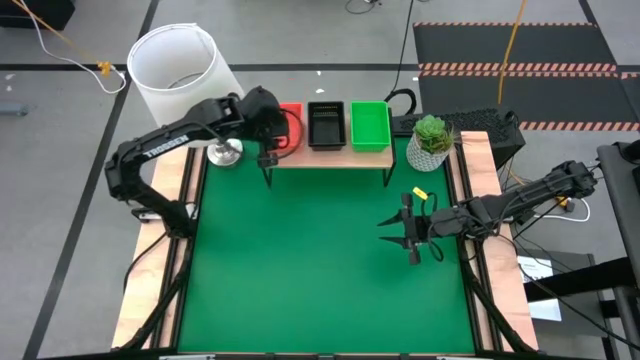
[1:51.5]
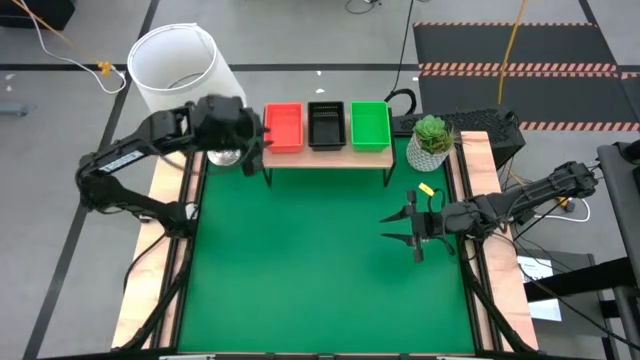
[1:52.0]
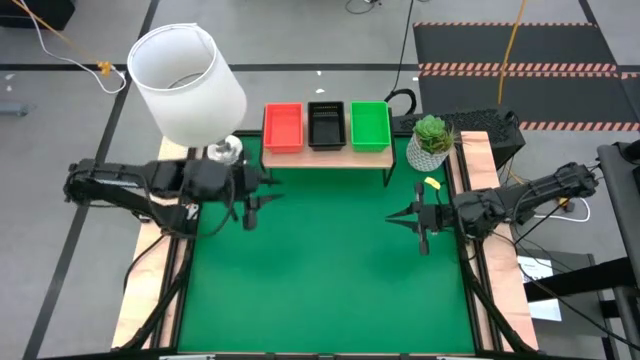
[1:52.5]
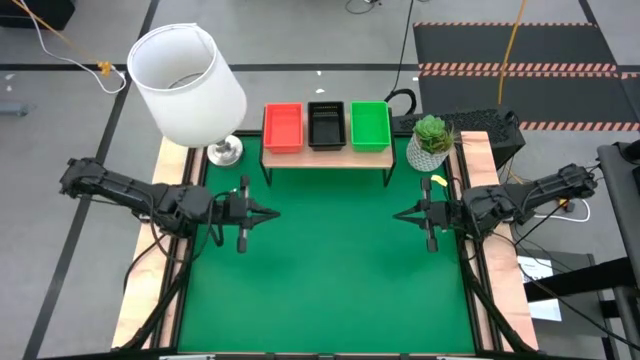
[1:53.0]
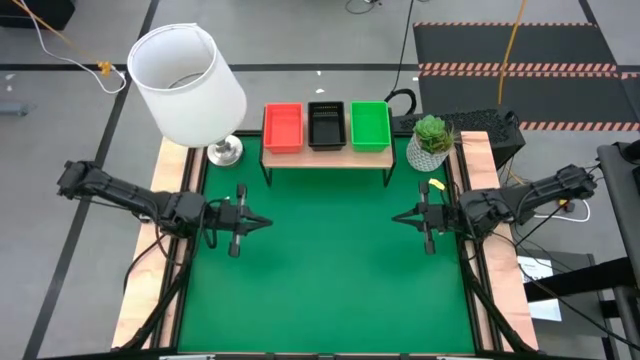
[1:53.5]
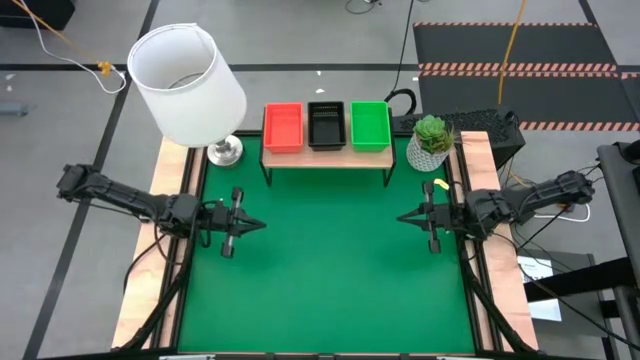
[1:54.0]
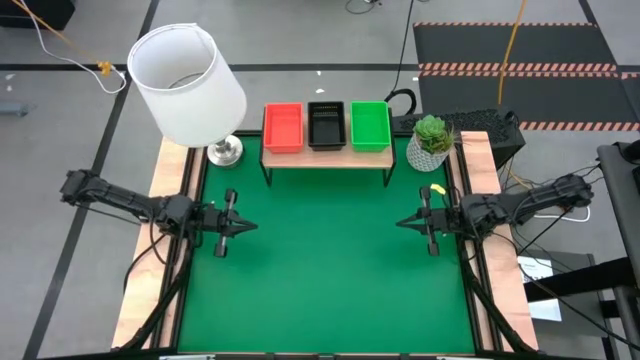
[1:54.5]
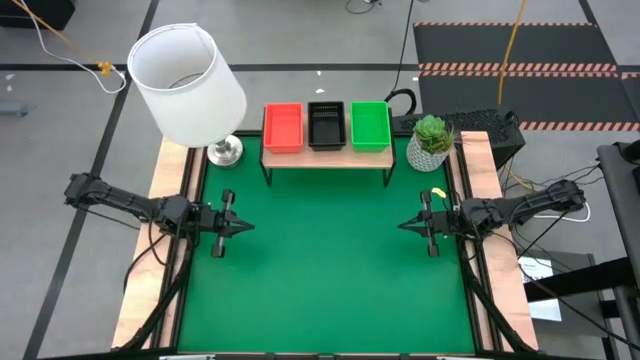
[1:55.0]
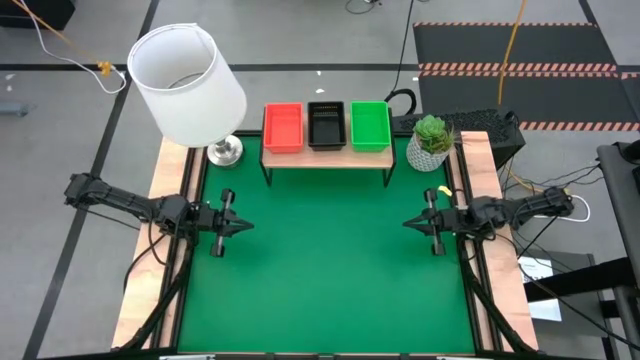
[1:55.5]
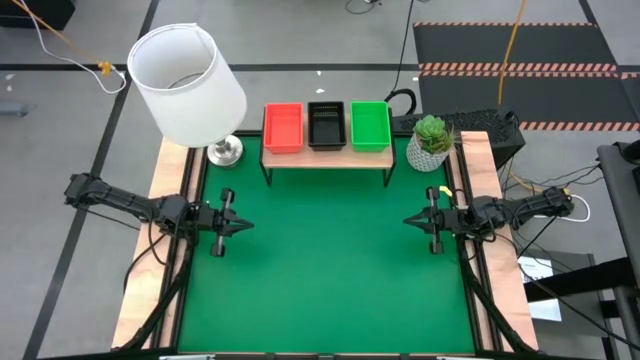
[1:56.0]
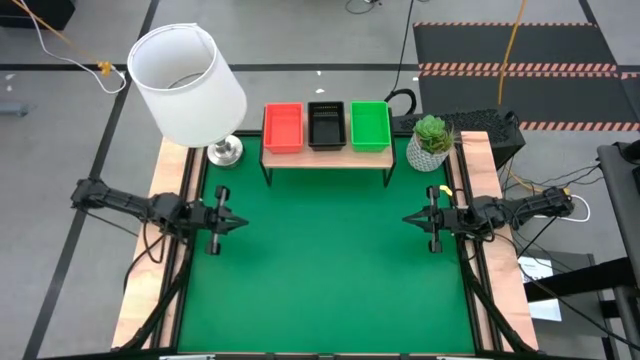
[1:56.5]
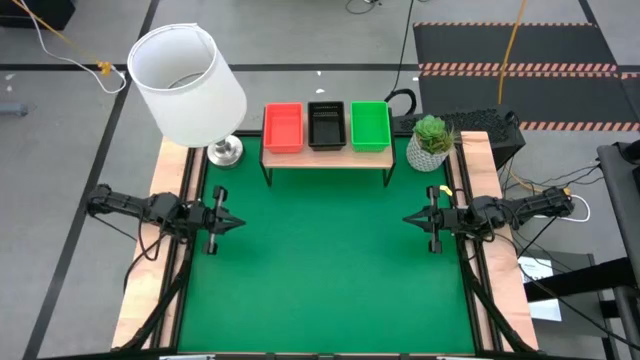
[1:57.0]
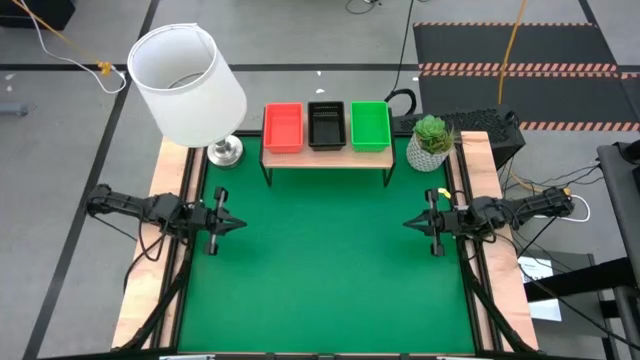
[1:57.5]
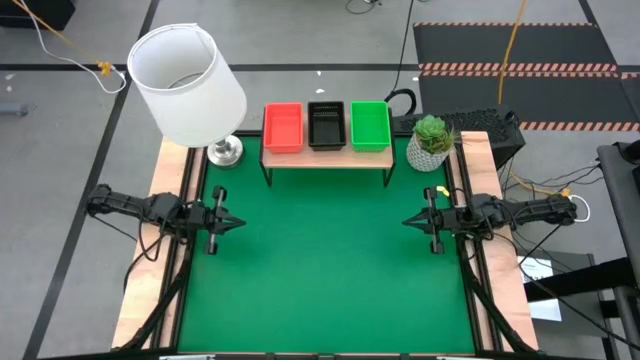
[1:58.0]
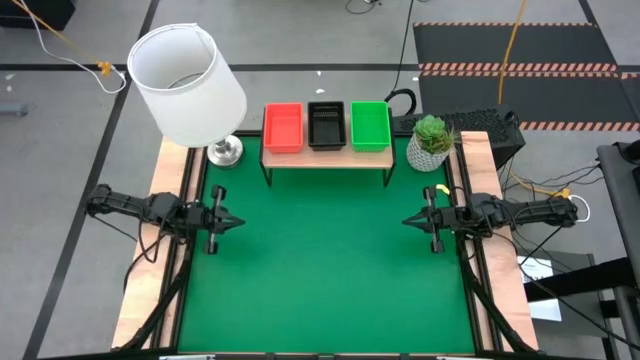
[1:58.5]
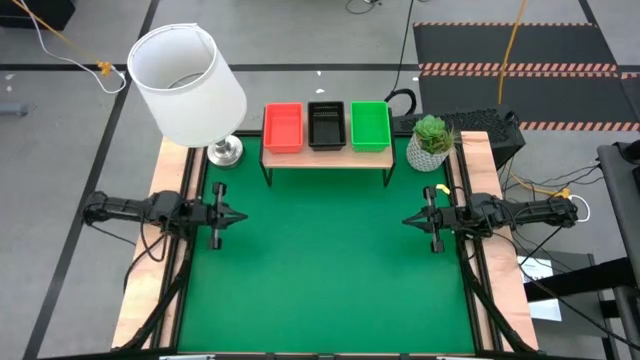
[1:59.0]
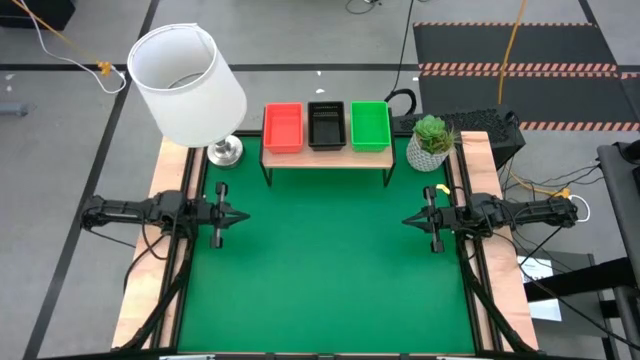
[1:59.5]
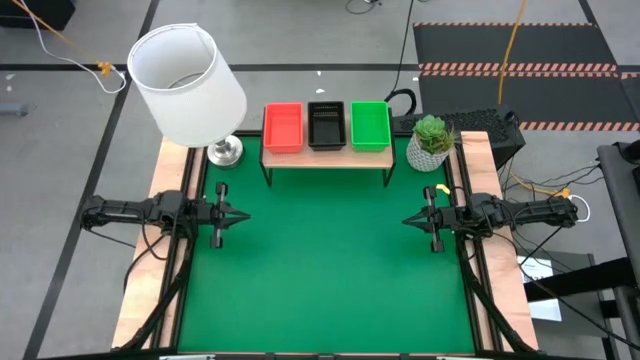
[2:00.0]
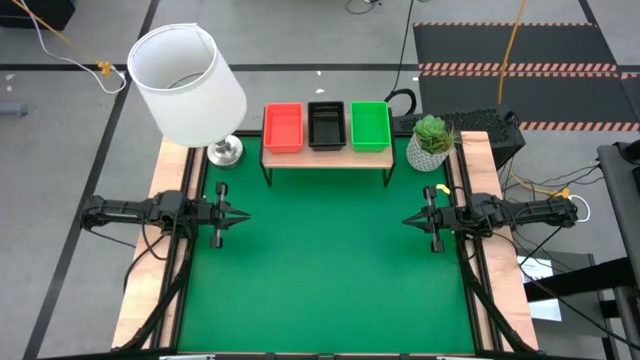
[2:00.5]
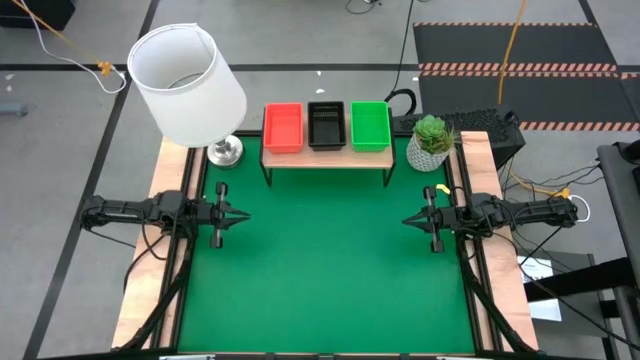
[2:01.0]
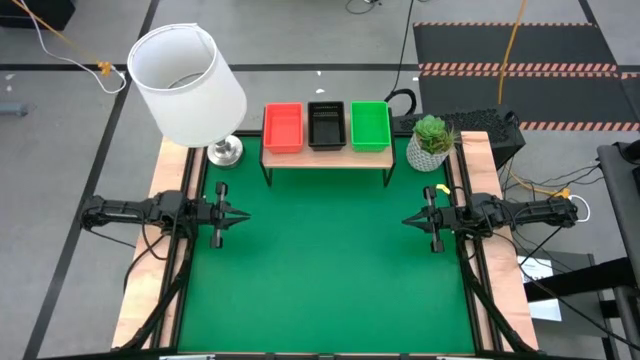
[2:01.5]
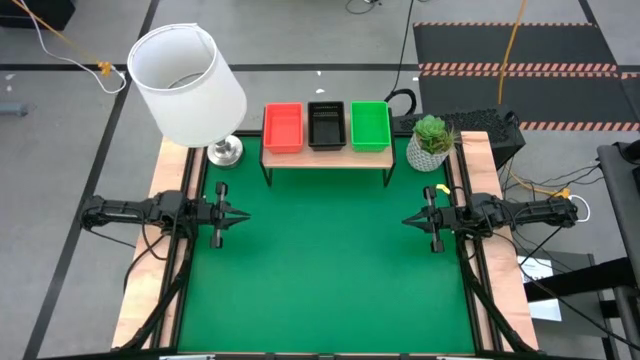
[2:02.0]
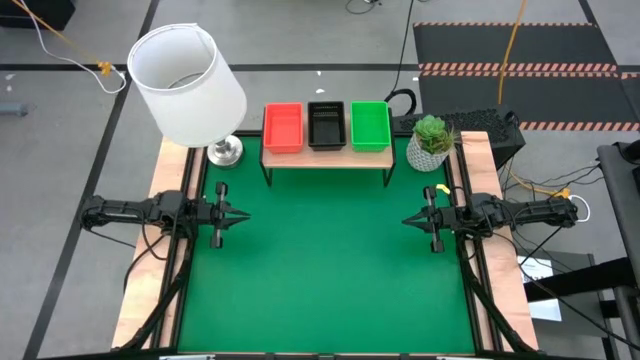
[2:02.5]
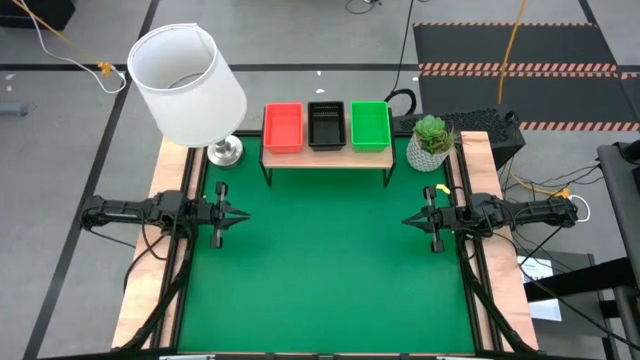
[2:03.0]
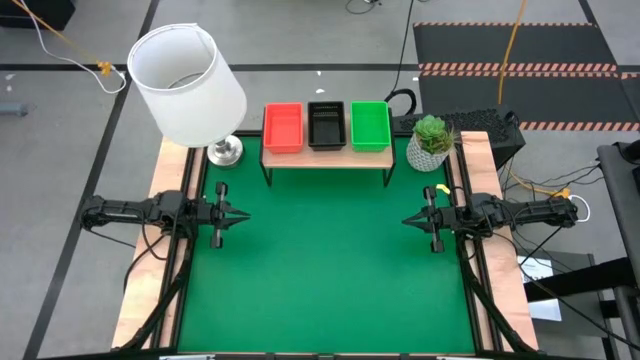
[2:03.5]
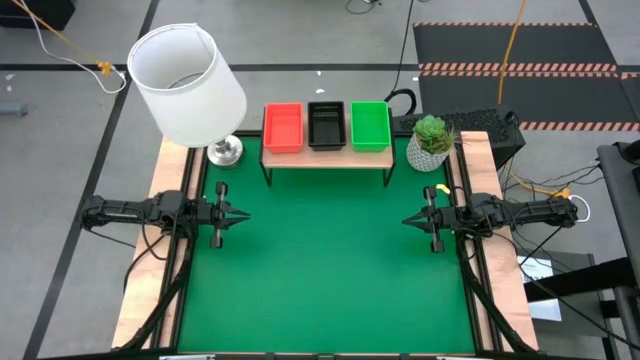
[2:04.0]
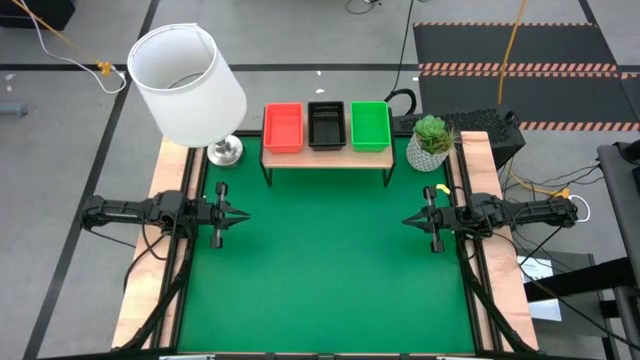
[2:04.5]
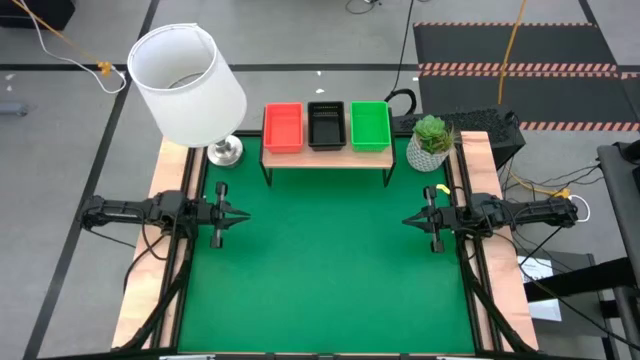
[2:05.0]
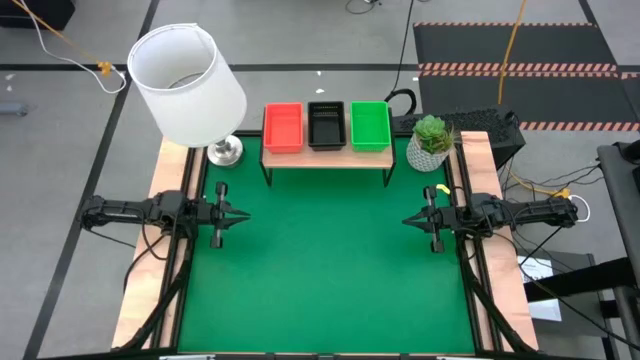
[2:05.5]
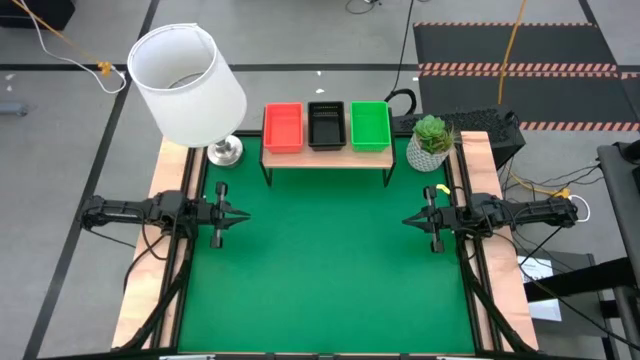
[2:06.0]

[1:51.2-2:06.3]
Task: Stack baskets on shelf by color
Return to Home Position

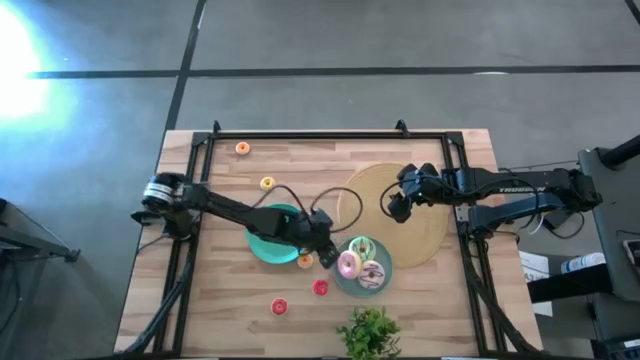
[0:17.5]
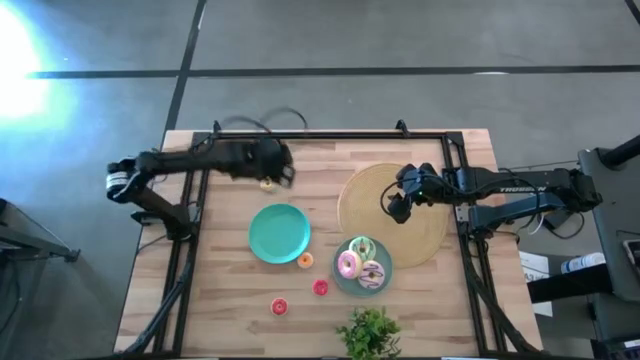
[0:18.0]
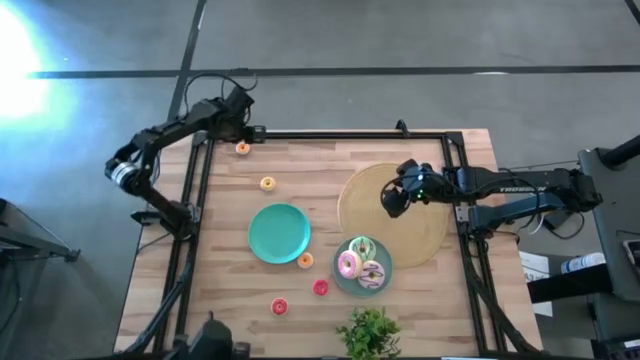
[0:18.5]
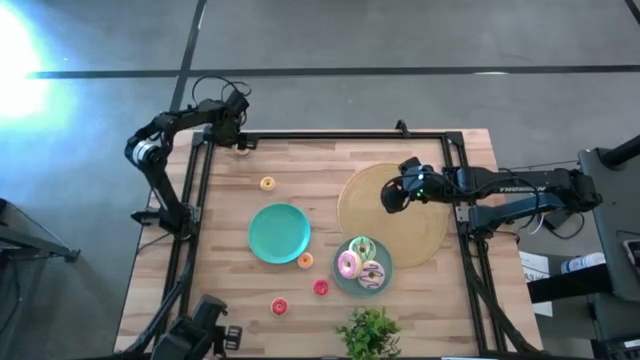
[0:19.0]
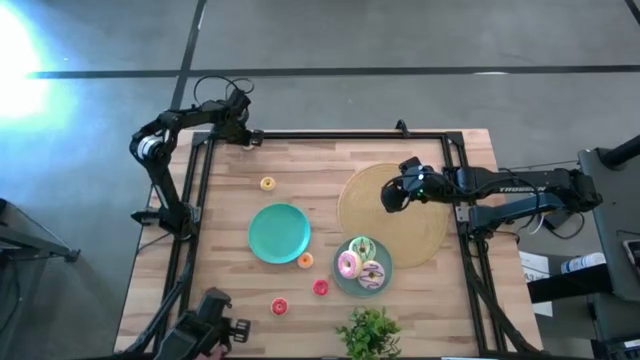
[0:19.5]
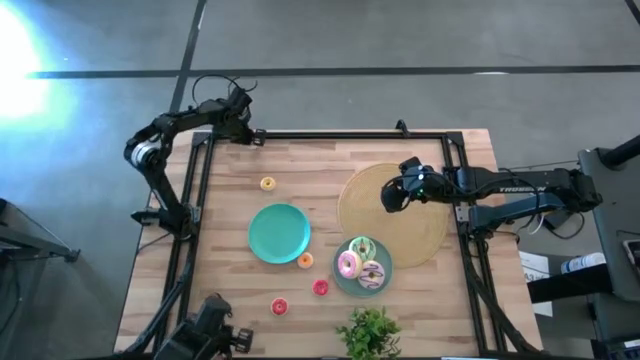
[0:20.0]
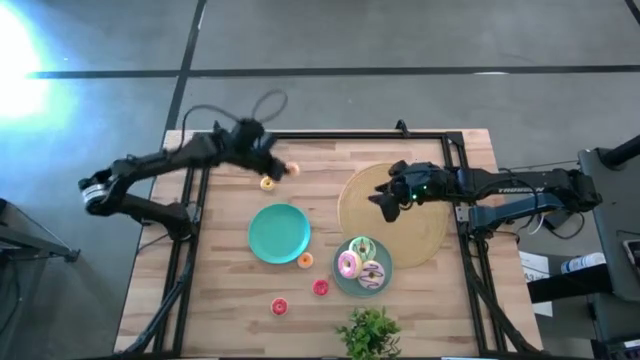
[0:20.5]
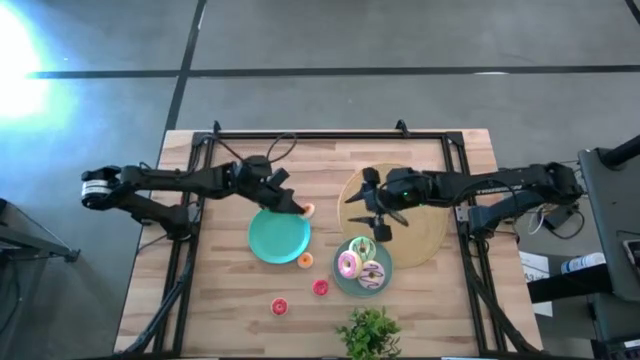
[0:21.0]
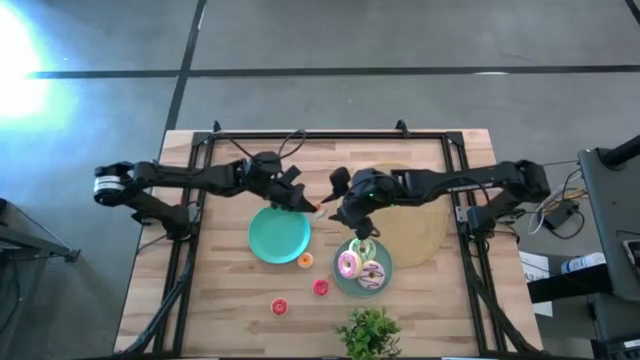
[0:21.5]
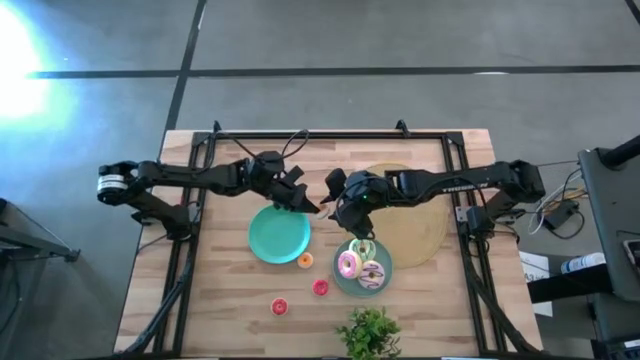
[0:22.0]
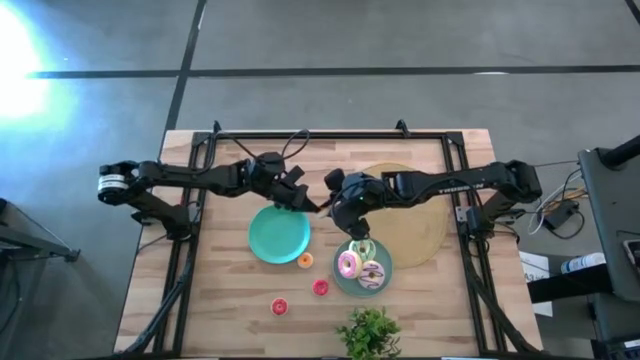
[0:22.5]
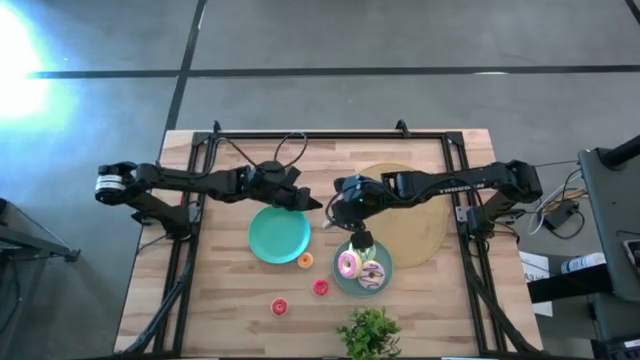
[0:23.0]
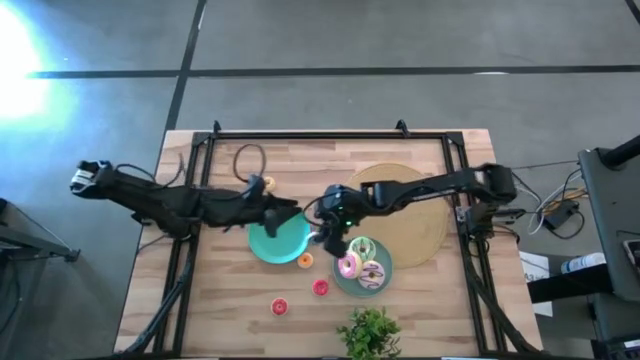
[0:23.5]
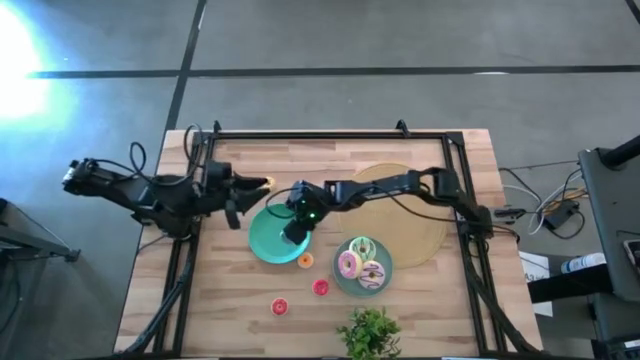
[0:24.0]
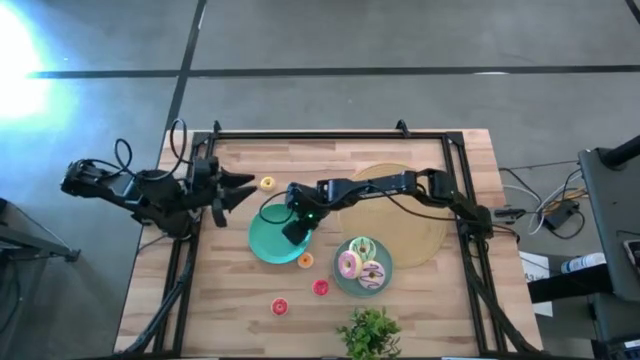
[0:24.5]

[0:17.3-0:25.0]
Task: Pick & Place donuts
Put the small blue donut on the green plate
